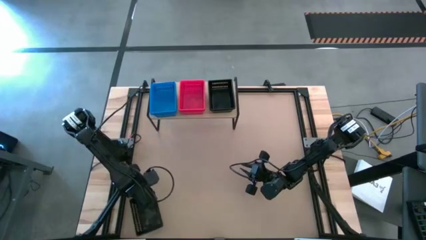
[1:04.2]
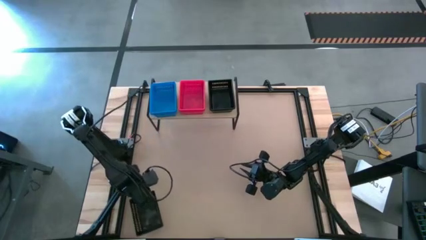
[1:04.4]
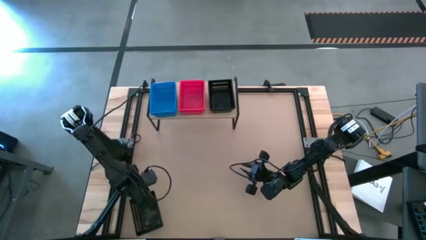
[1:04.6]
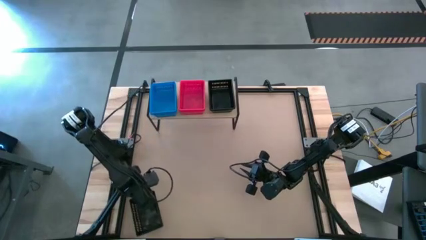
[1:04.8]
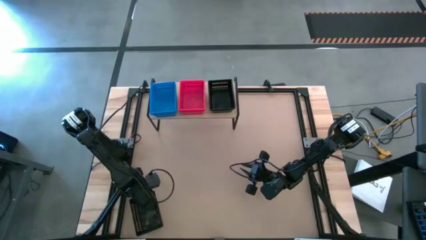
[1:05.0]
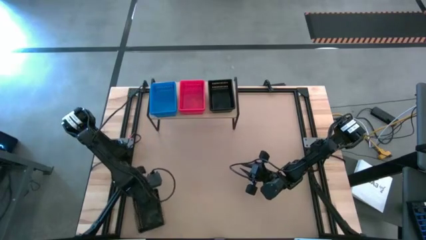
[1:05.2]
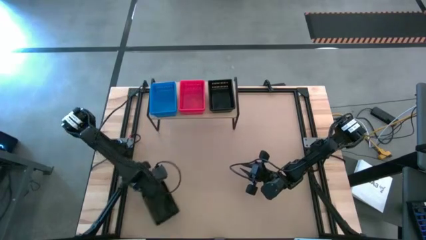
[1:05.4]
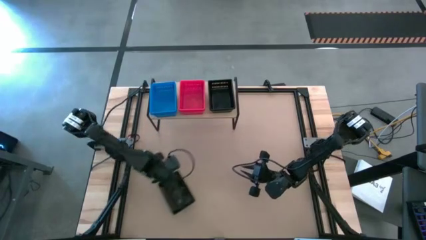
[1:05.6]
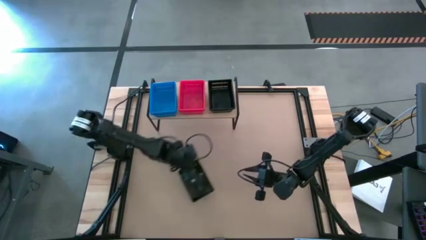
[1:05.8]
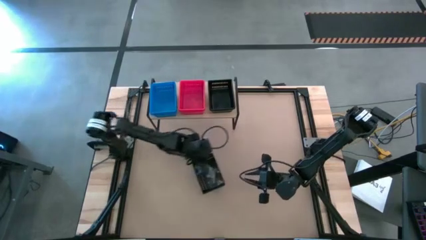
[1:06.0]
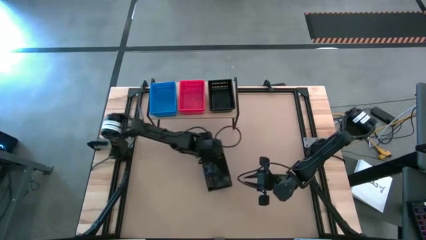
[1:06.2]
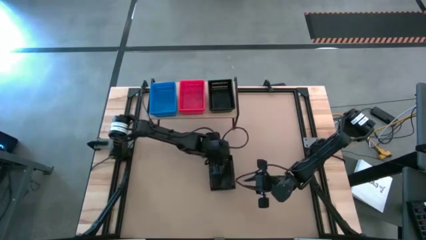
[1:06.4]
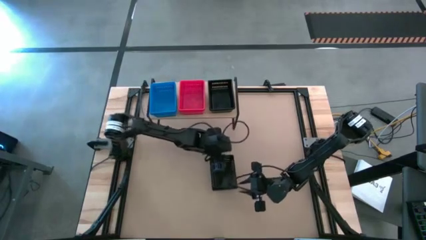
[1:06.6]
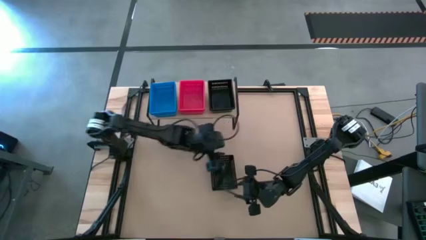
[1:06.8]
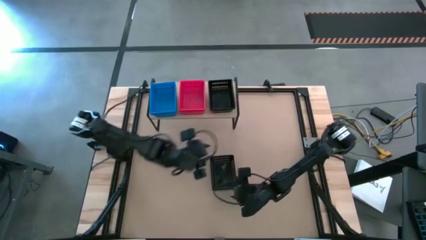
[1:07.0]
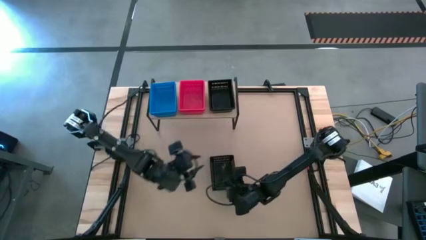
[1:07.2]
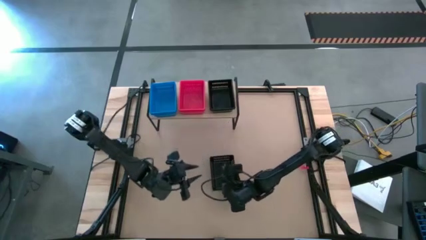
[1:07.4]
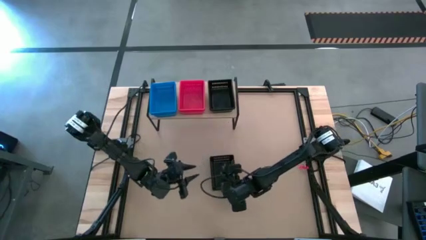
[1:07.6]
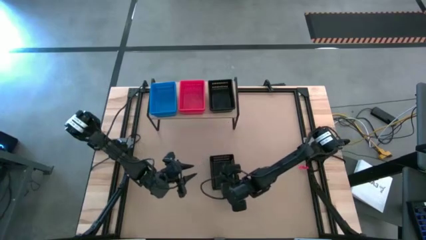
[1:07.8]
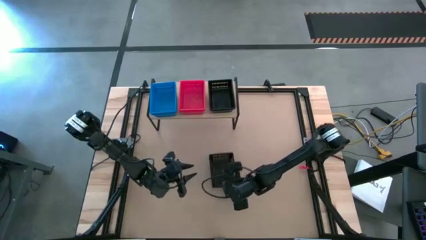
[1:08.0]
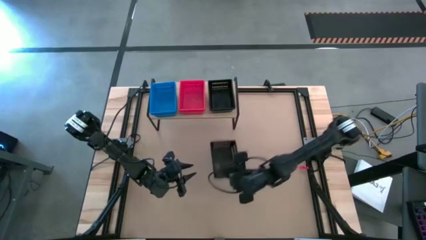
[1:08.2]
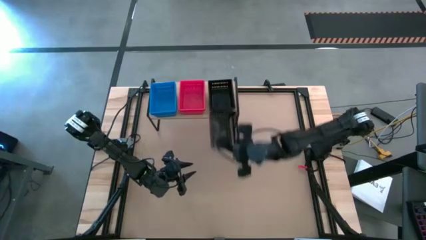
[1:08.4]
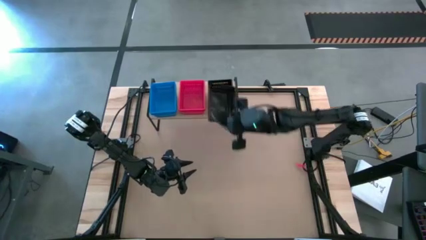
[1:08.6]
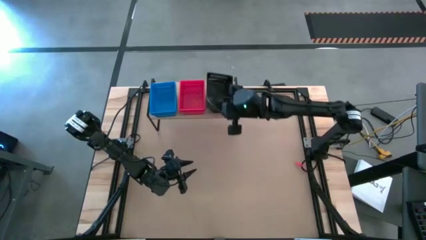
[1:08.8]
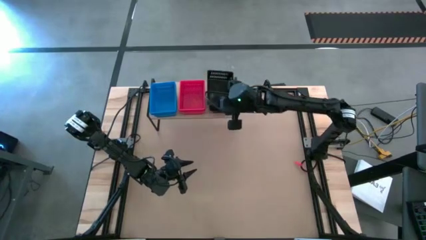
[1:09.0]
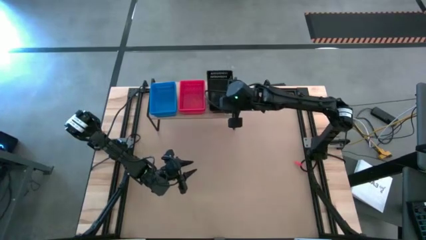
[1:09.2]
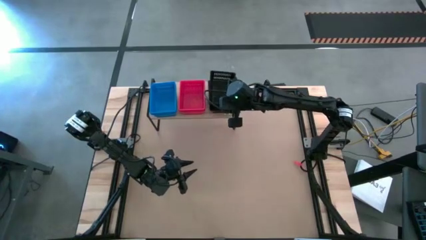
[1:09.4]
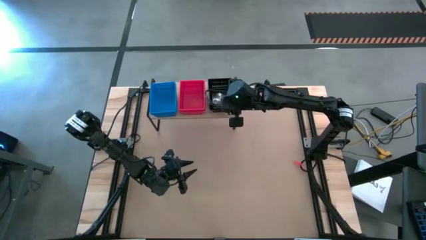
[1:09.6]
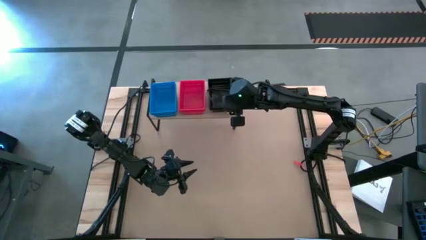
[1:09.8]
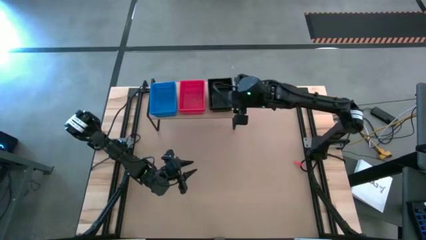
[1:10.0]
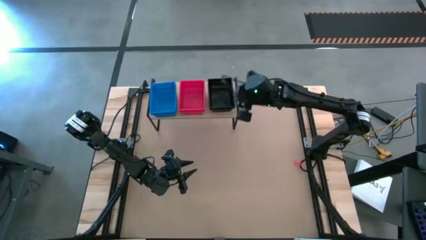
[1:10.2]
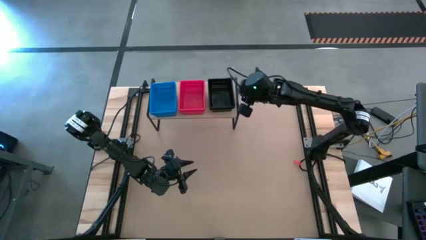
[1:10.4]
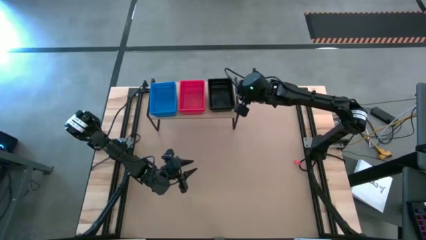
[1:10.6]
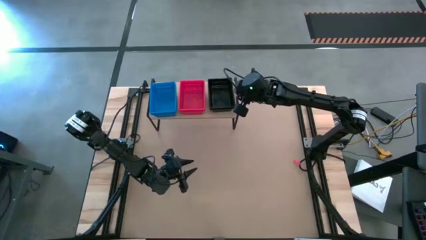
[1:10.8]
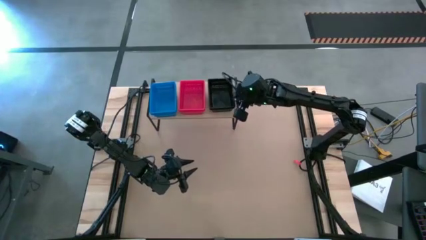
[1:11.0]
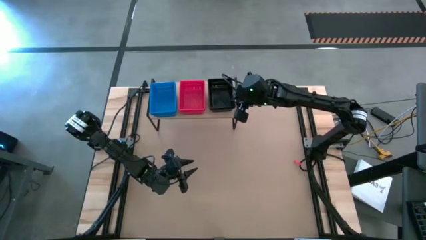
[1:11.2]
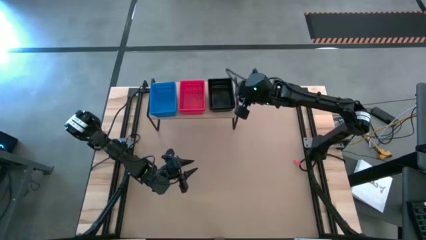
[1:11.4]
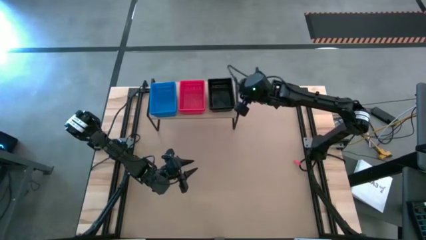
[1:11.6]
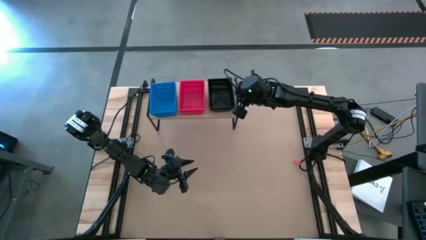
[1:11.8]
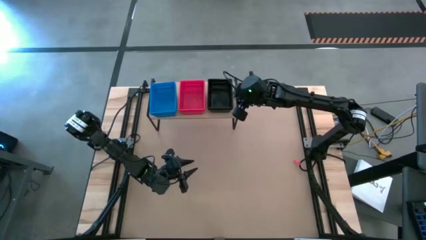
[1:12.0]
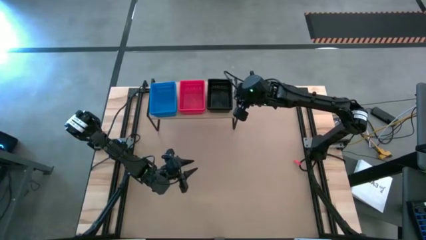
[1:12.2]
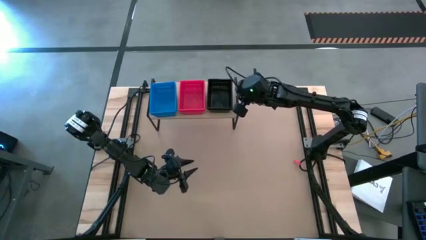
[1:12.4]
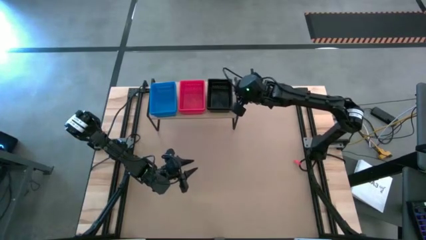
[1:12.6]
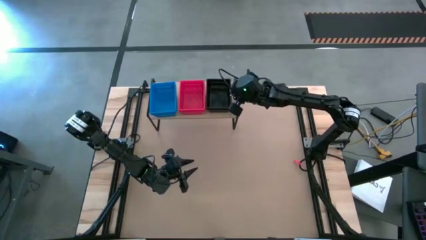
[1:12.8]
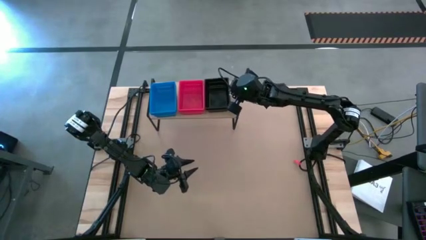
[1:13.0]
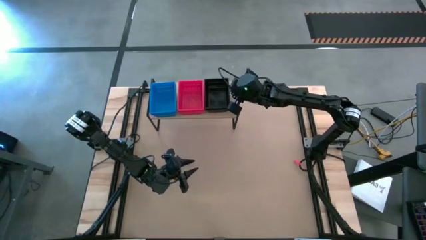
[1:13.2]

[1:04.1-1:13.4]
Task: Stack baskets on shelf by color
Stack the black bin on the black bin on the shelf

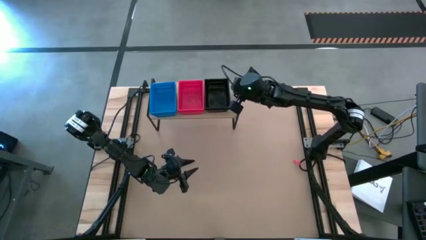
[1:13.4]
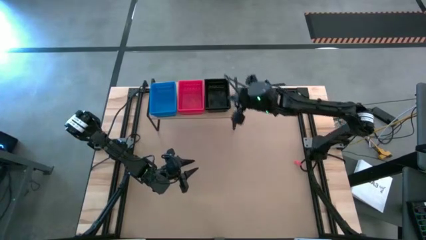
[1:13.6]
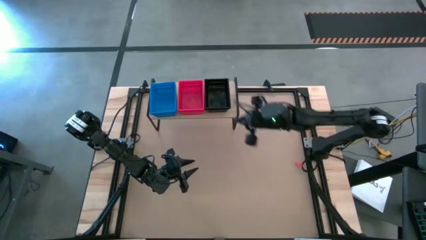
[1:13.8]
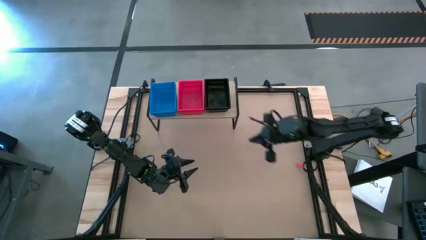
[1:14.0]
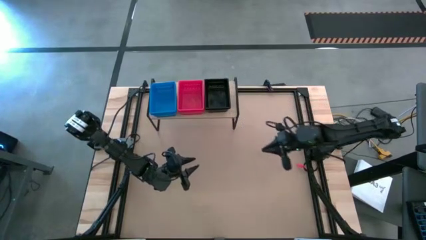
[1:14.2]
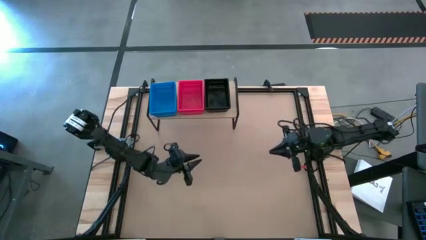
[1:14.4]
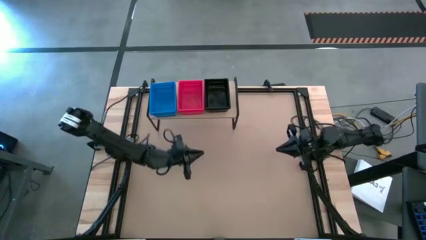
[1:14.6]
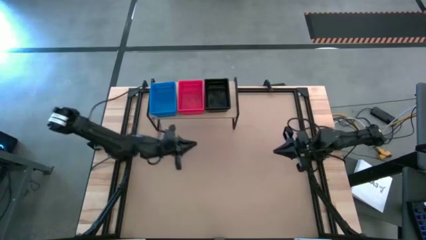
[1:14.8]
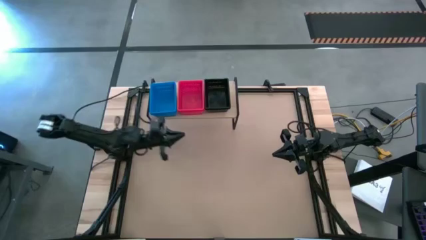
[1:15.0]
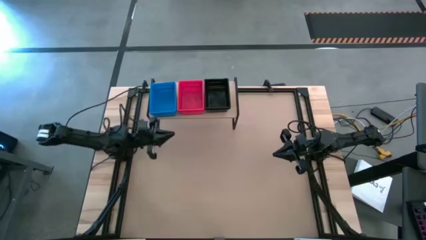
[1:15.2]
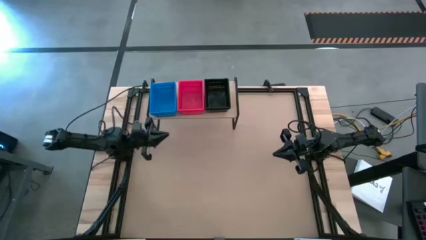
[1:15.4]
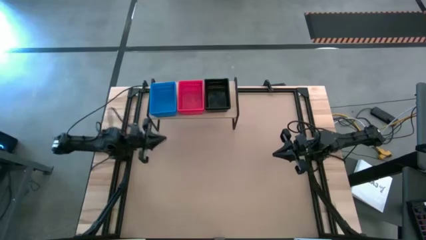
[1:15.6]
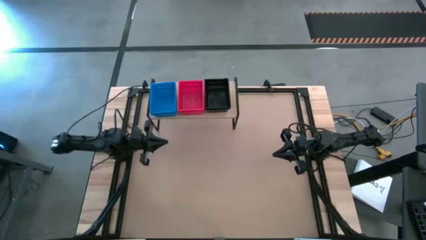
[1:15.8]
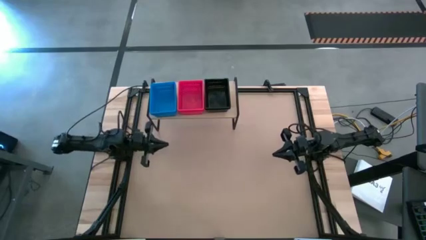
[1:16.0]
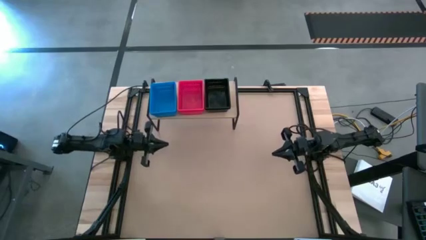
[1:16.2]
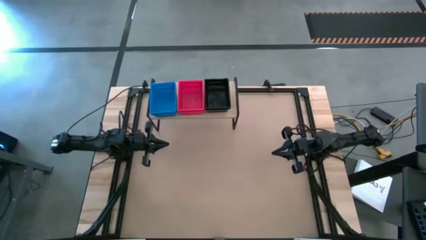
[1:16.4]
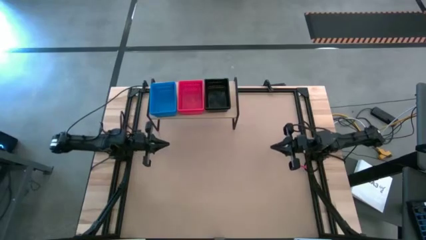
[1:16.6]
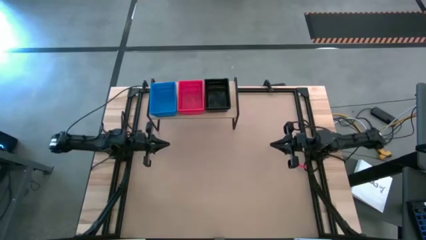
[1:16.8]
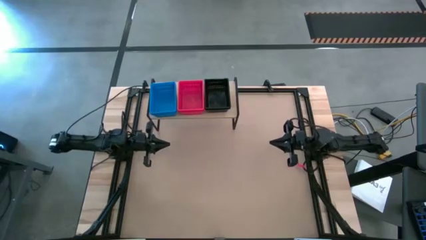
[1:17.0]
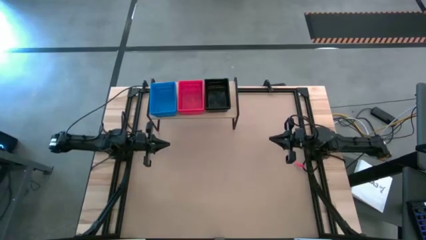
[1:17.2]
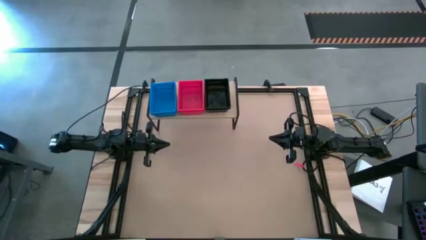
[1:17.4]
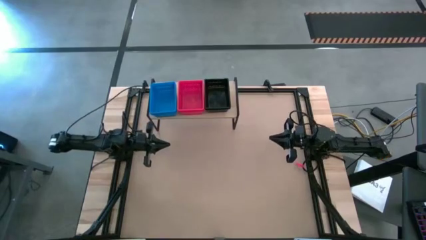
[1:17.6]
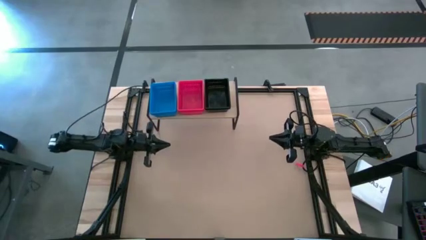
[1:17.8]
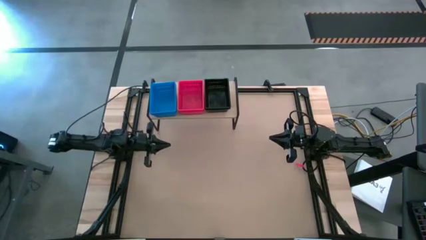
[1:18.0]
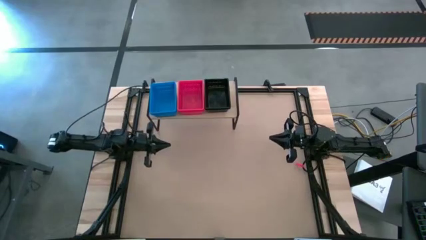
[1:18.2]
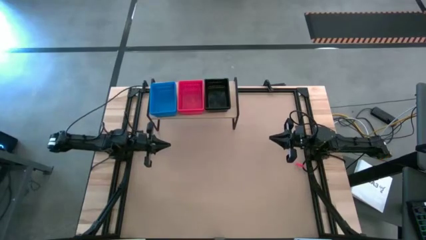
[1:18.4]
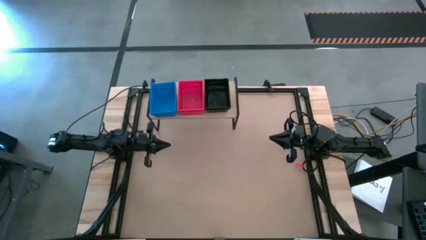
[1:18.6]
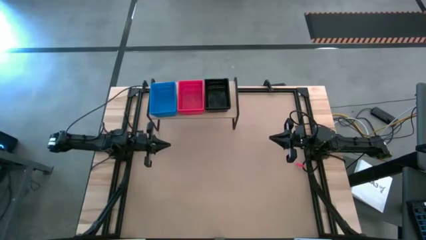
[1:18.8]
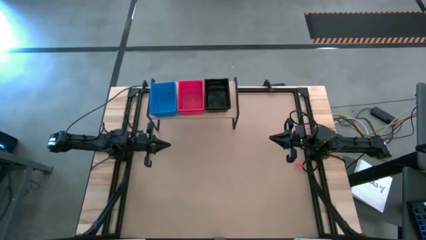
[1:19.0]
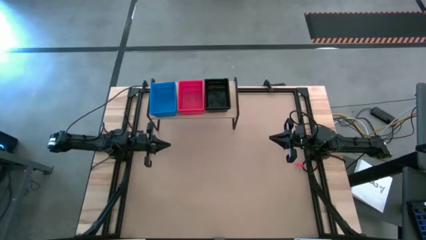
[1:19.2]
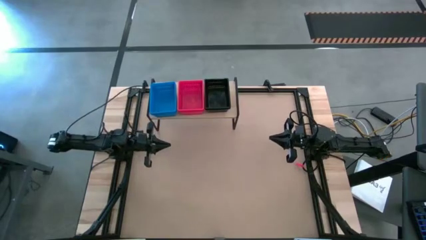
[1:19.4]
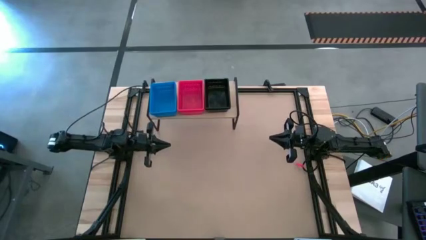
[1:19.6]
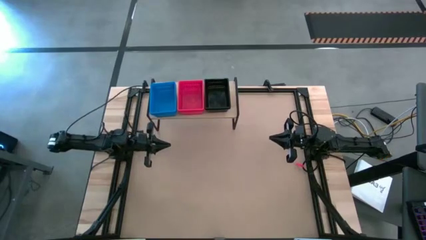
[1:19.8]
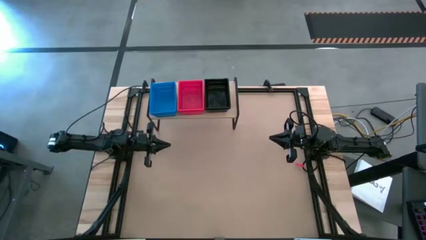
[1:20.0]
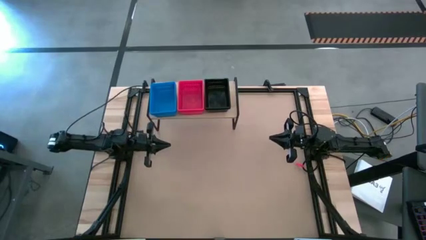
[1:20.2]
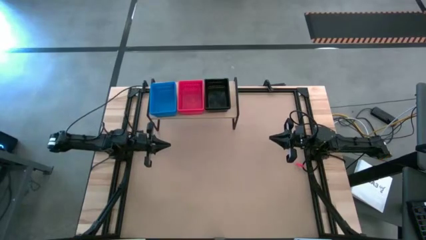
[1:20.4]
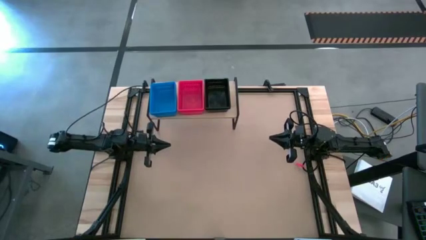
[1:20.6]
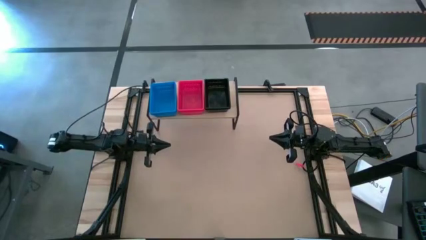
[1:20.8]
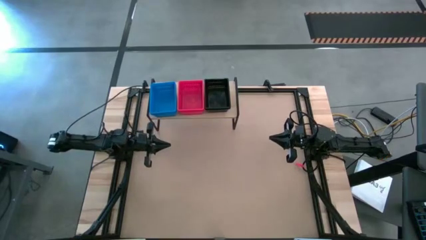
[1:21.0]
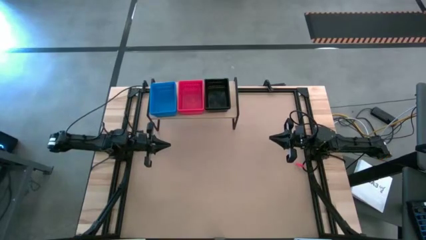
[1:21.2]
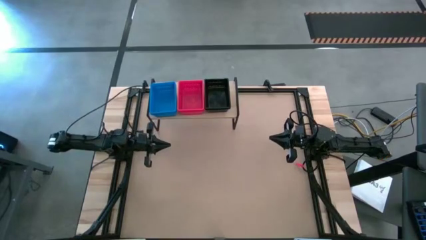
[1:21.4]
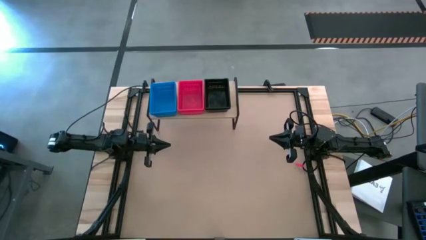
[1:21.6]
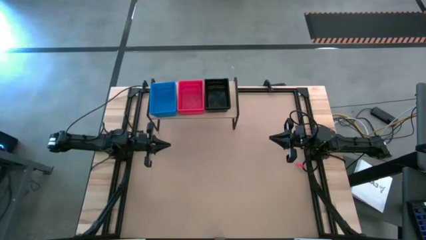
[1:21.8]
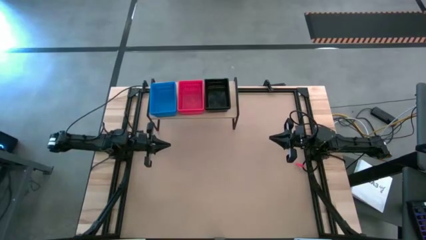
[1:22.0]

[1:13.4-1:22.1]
Return to Home Position
